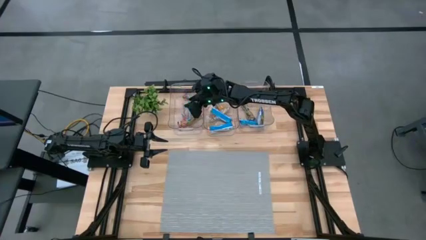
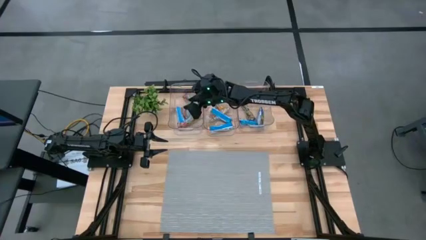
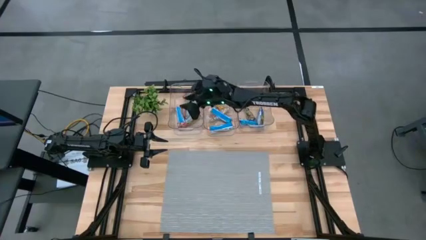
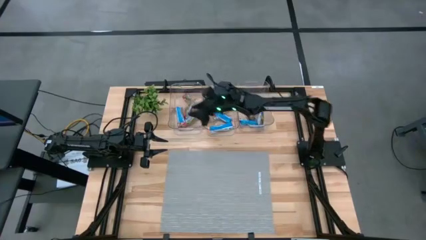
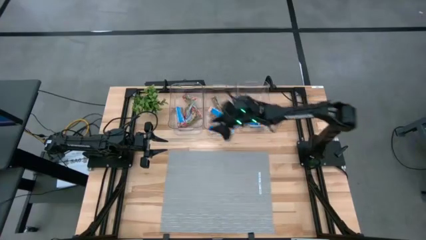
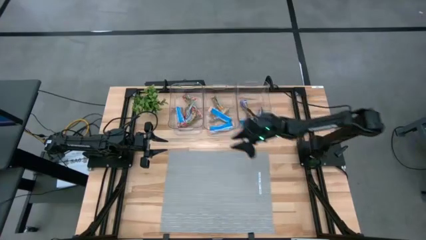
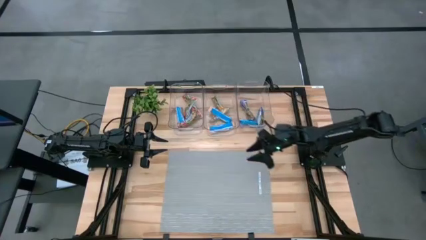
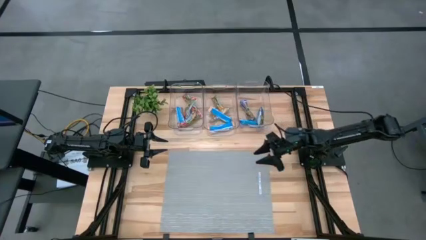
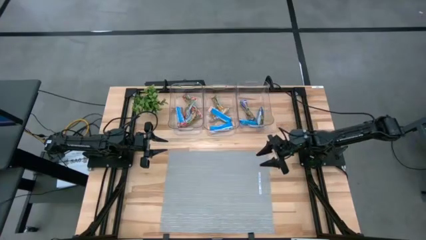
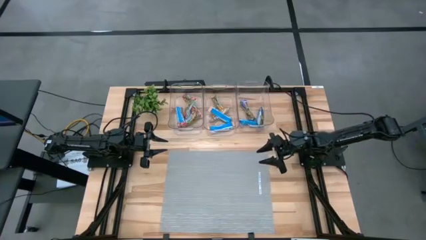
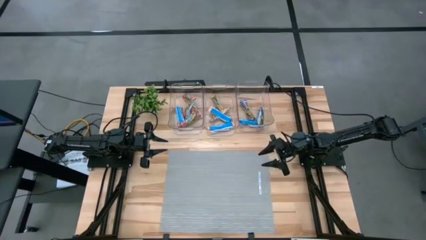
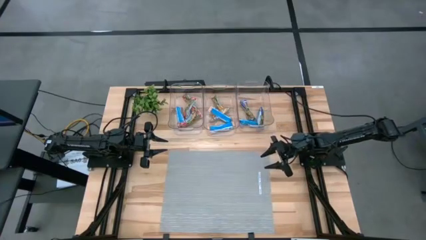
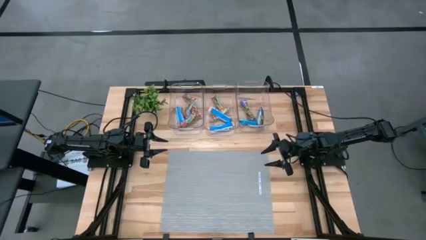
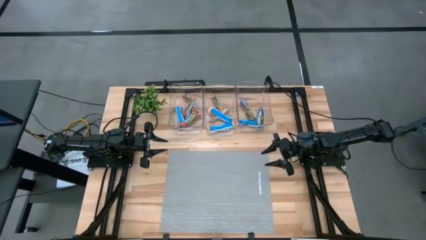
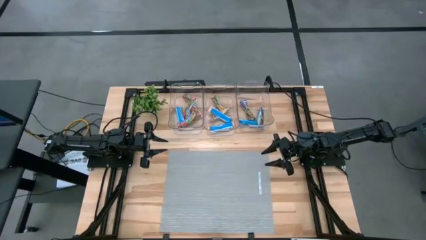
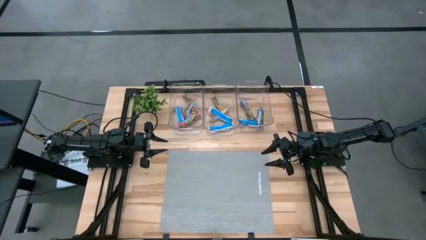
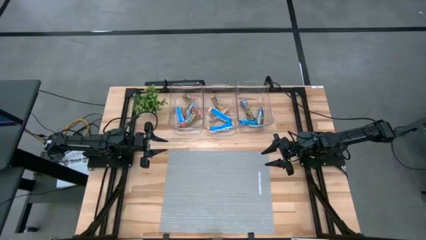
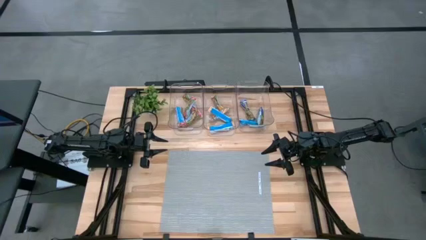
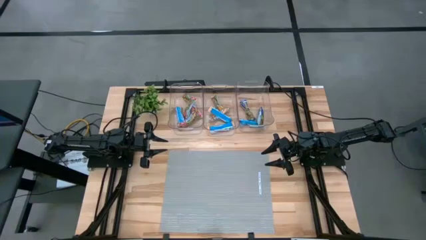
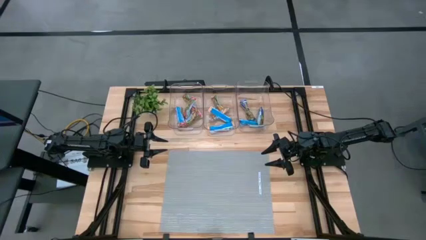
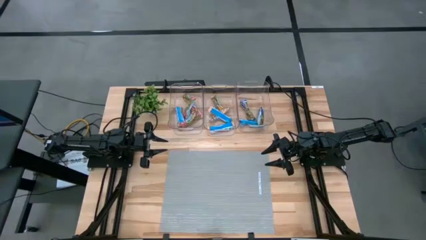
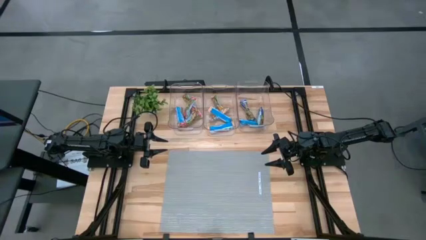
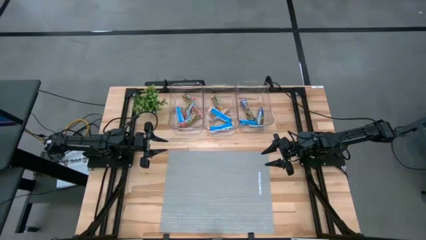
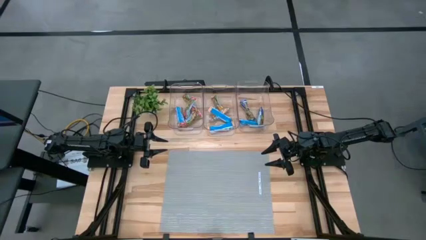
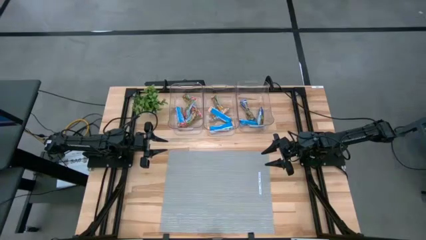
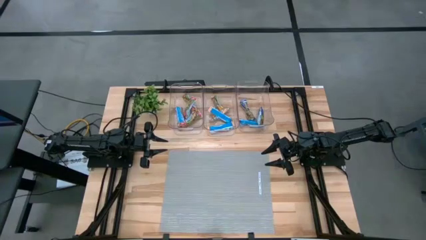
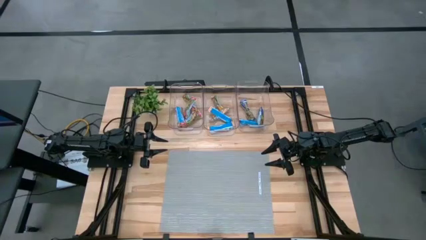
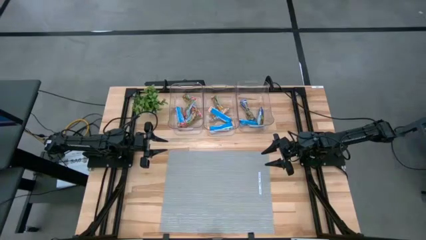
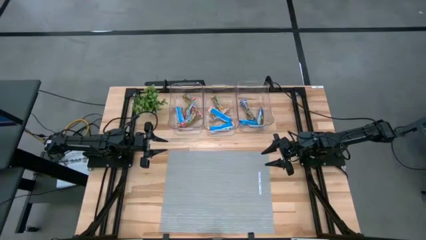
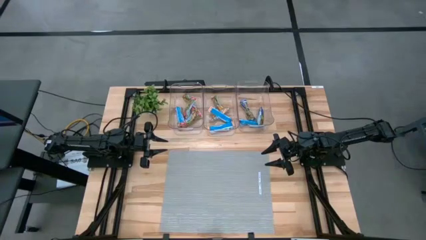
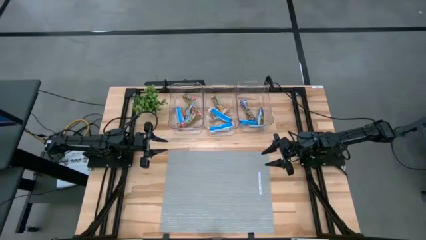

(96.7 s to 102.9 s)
Task: Pick and place Granola Bars by type
Return to Home Position

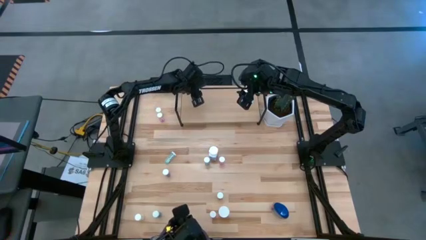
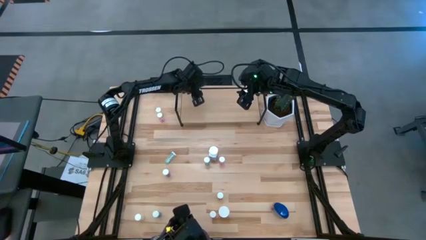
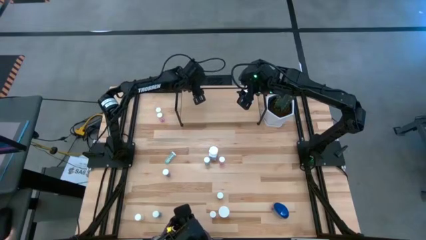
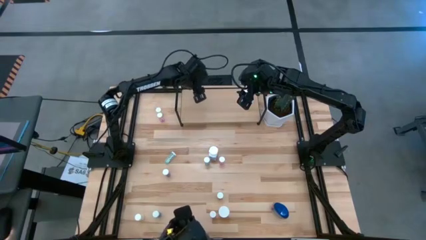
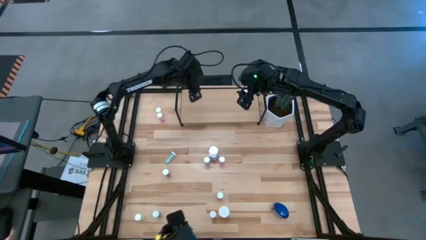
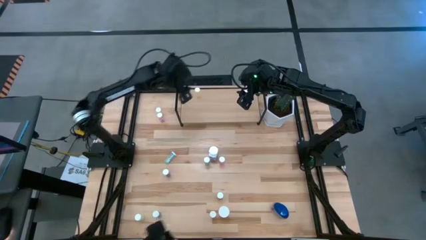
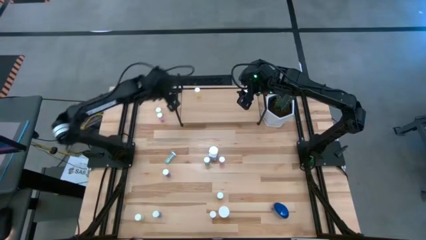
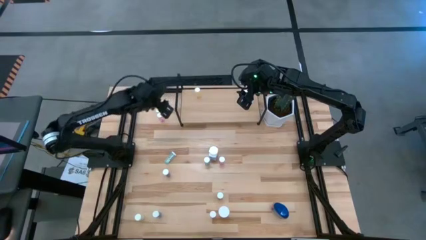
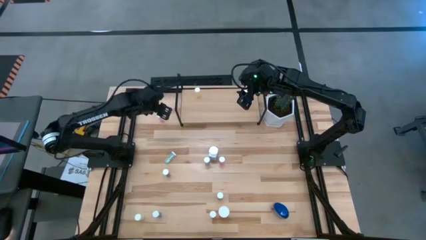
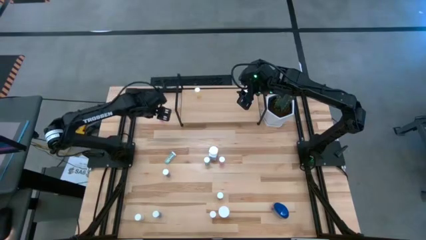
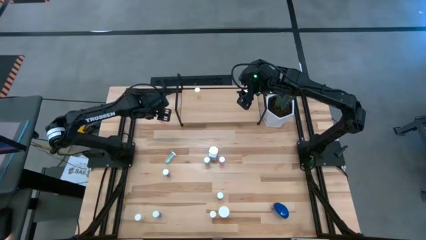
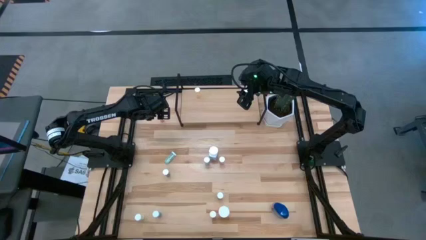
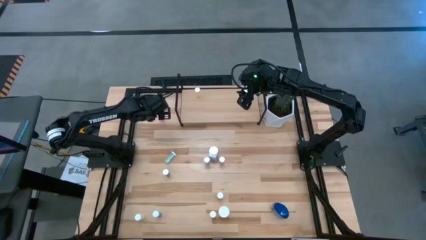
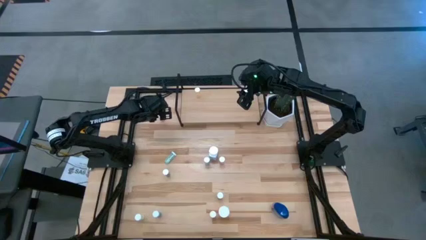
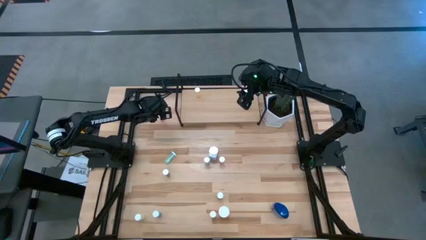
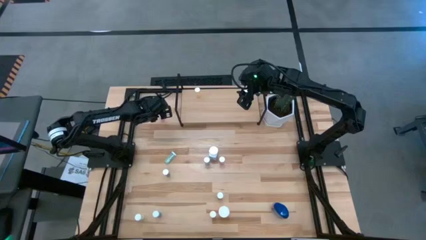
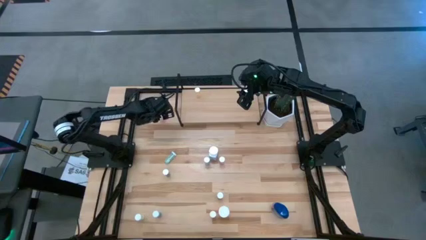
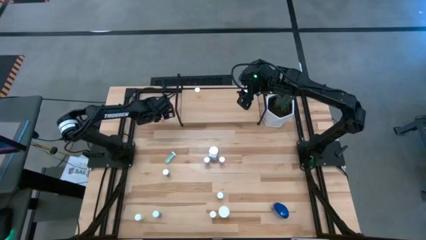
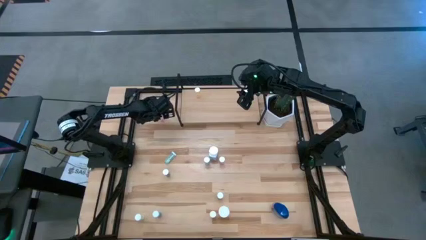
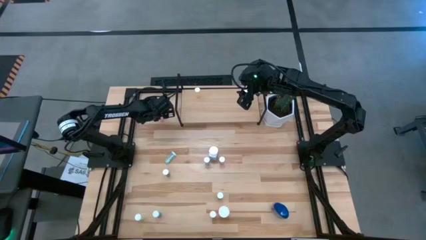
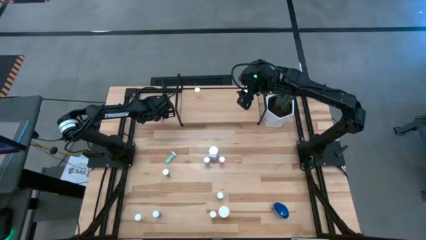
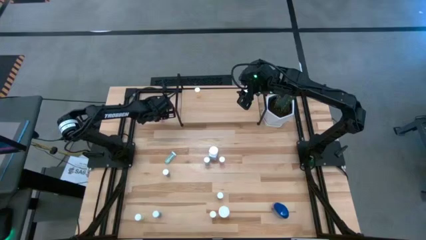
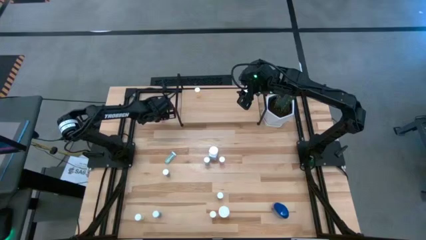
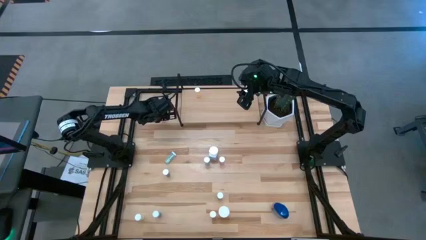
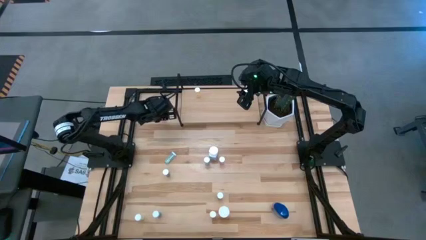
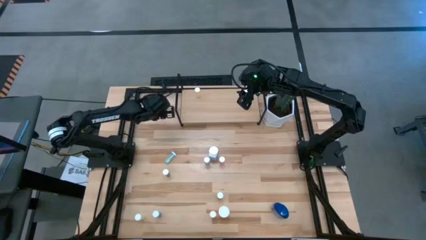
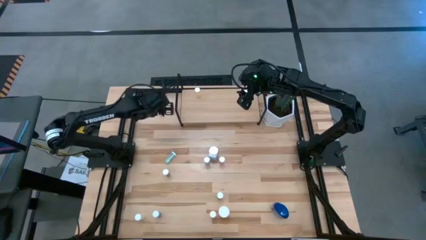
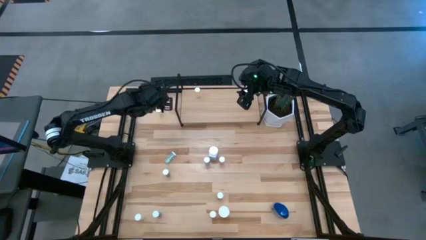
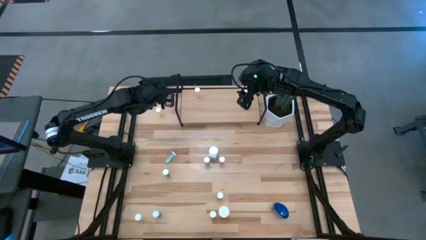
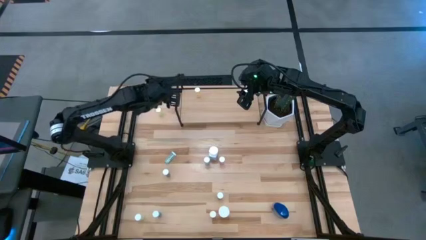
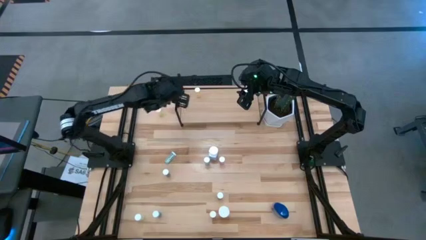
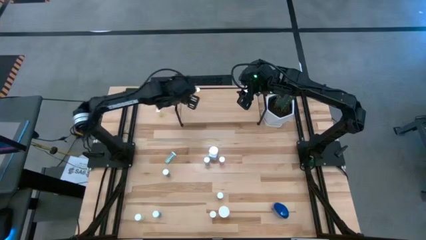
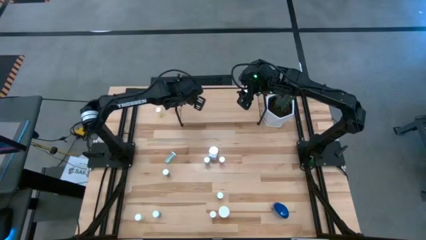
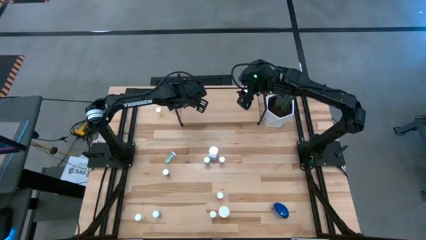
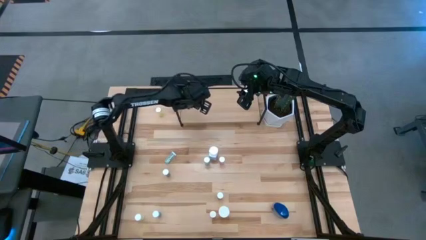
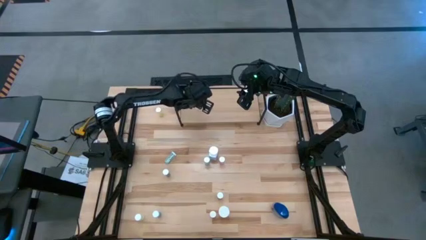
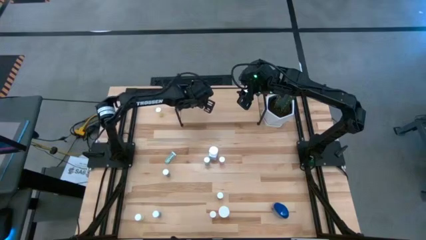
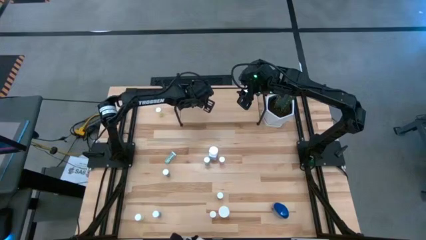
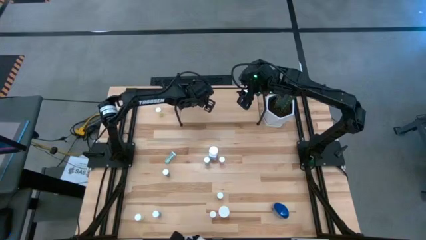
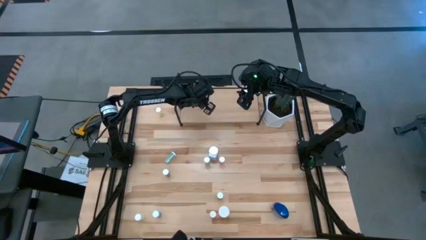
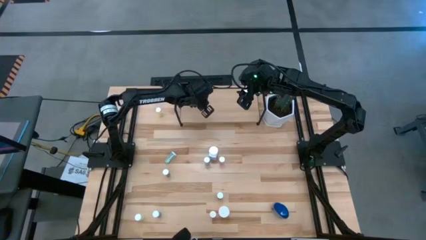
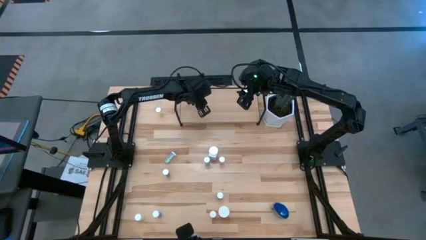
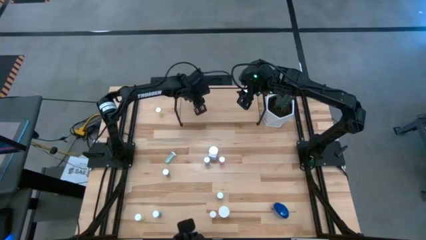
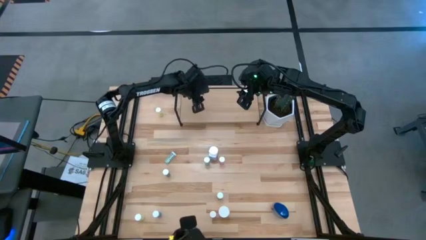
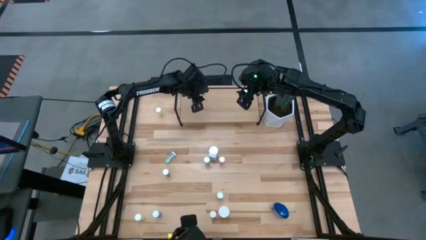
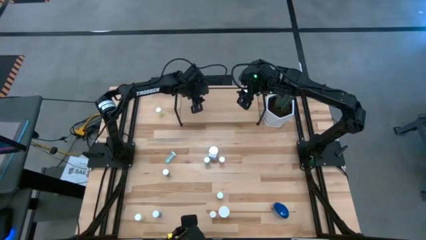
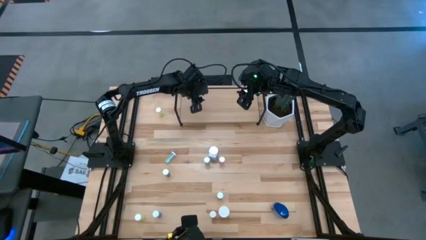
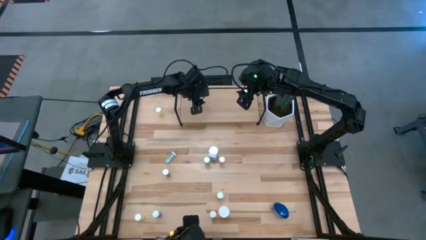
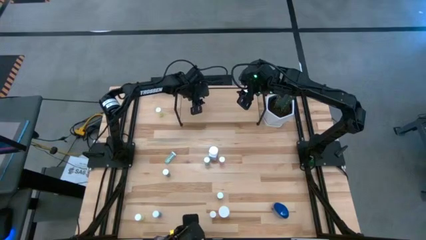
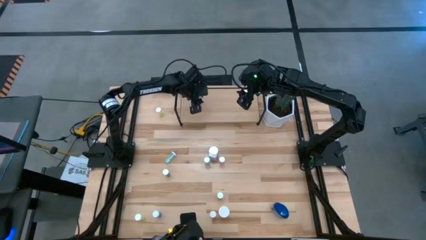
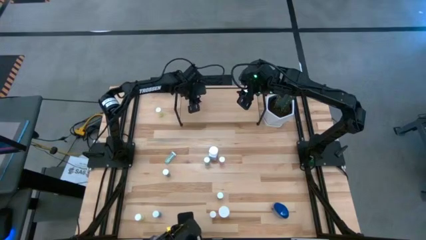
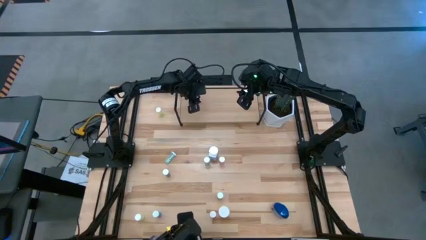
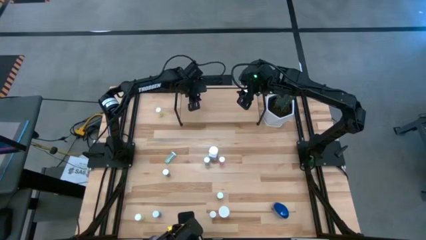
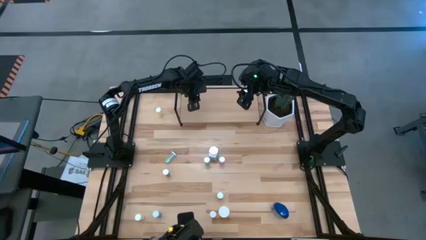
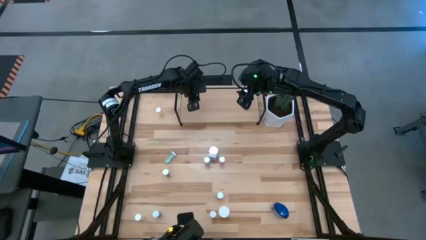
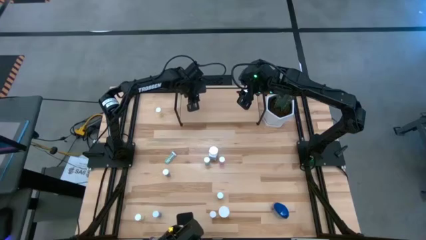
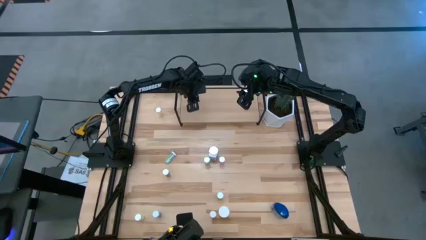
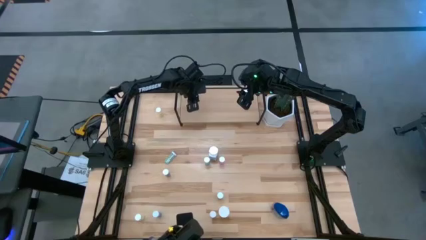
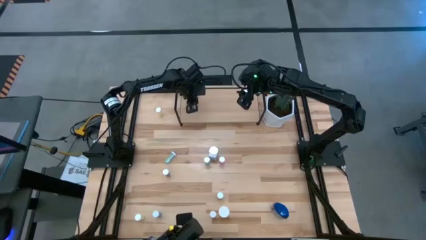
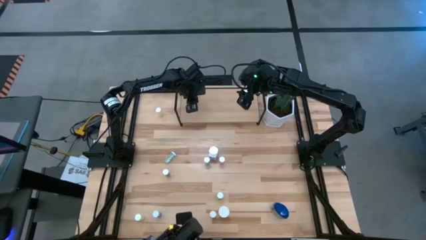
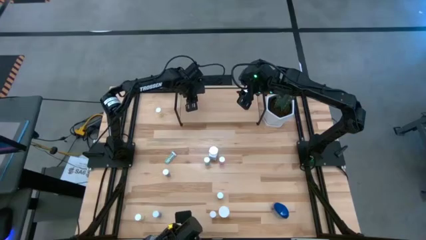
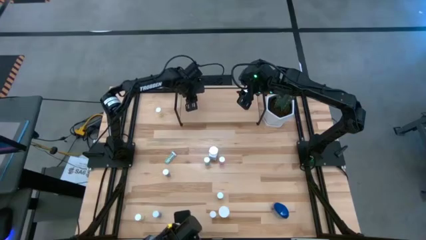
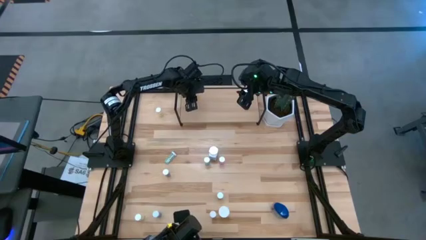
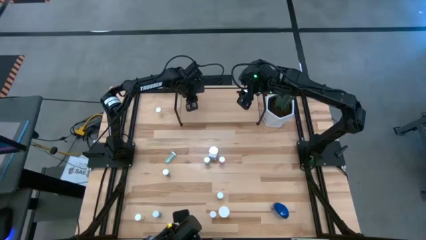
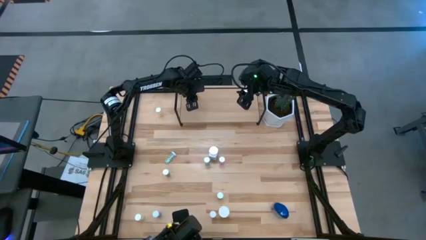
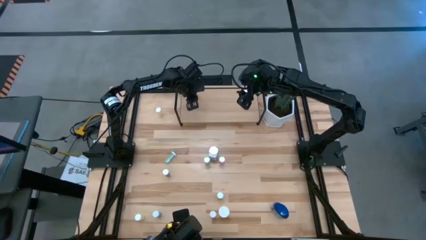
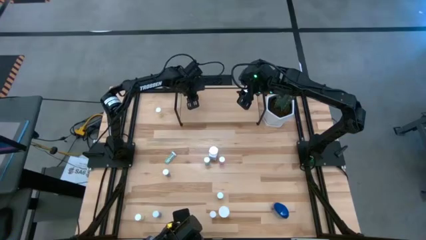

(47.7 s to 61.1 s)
Task: Pick and place medicine bottles onto shelf by color
Put the pink pill bottle on the shelf
